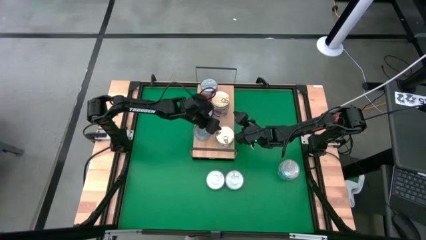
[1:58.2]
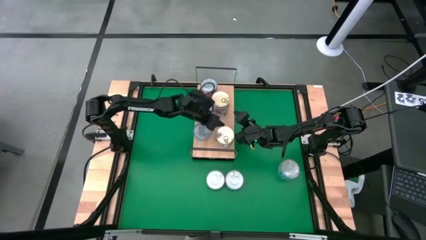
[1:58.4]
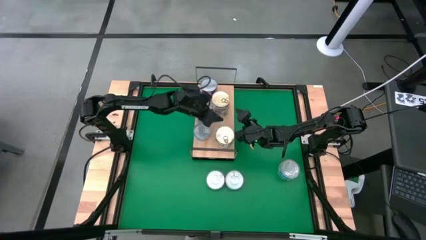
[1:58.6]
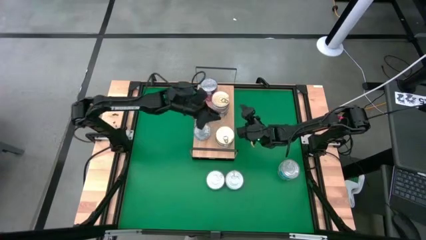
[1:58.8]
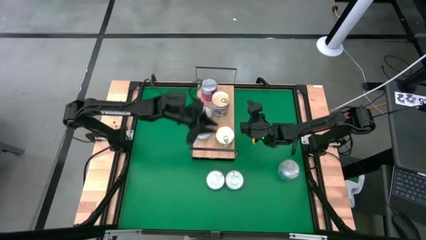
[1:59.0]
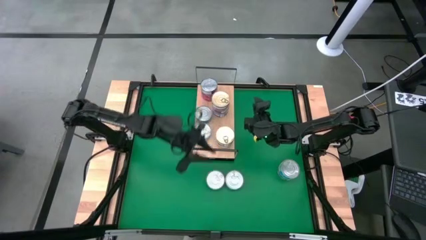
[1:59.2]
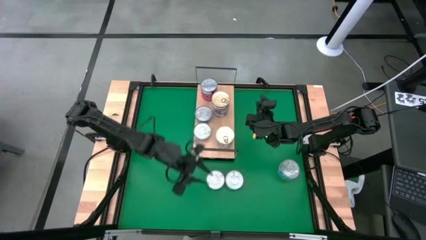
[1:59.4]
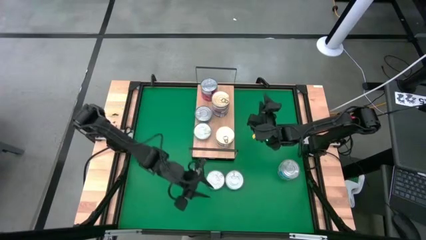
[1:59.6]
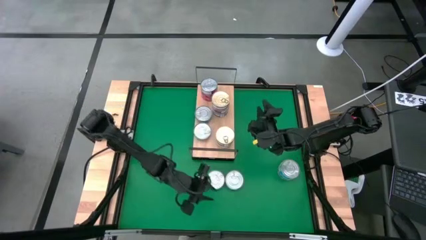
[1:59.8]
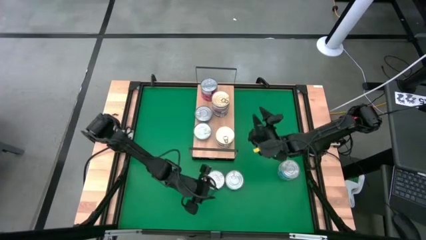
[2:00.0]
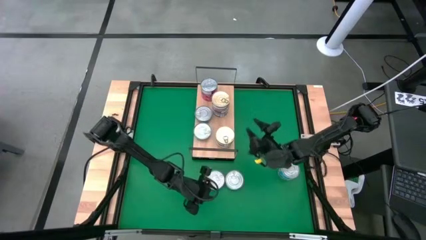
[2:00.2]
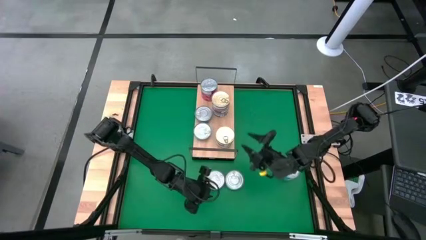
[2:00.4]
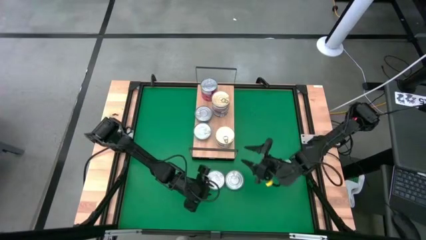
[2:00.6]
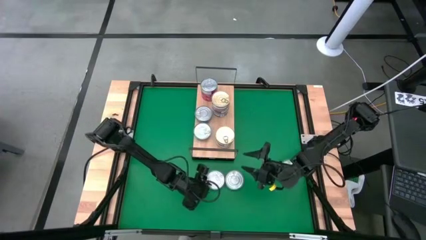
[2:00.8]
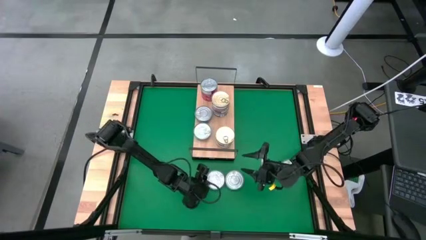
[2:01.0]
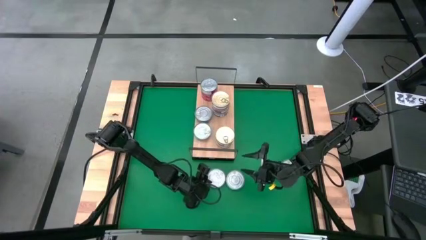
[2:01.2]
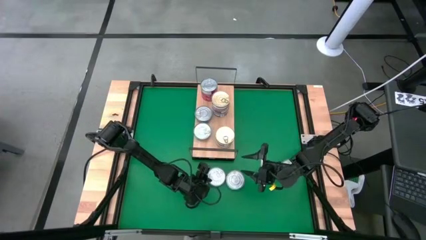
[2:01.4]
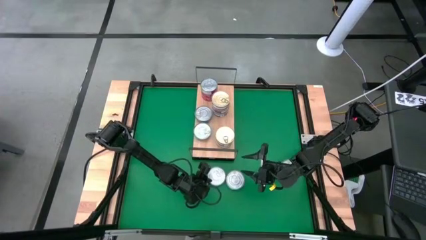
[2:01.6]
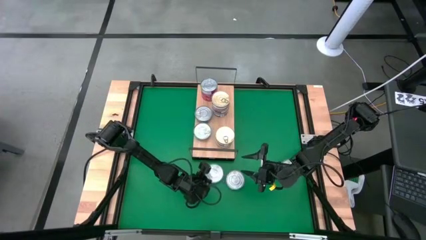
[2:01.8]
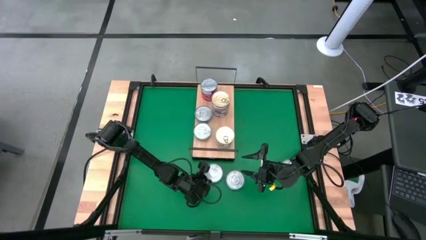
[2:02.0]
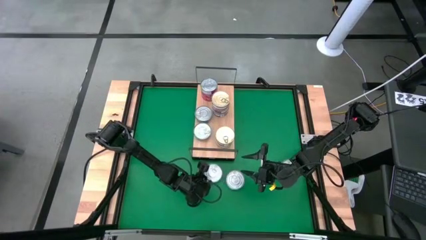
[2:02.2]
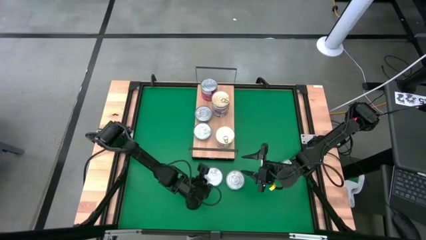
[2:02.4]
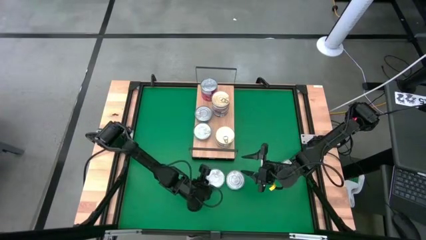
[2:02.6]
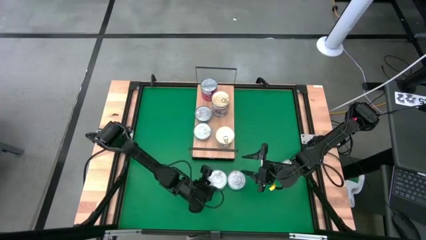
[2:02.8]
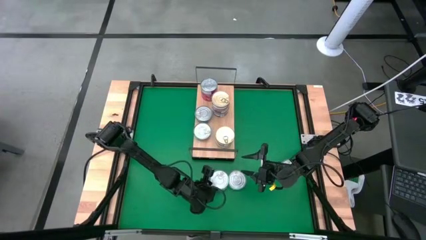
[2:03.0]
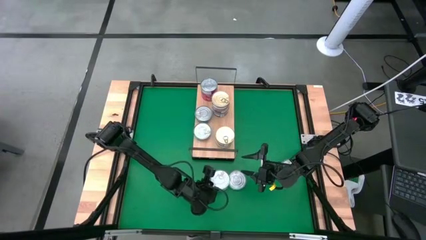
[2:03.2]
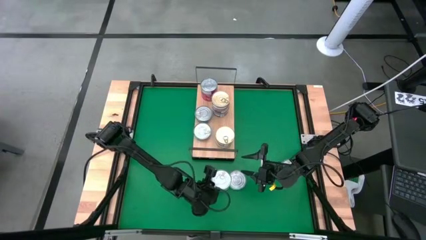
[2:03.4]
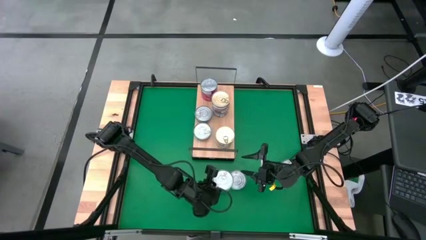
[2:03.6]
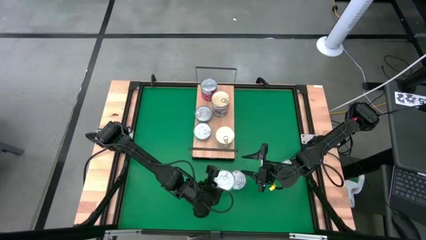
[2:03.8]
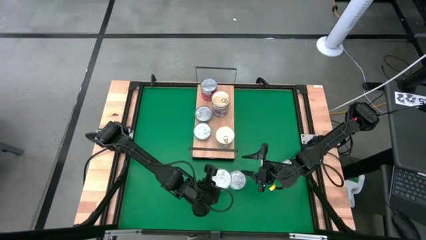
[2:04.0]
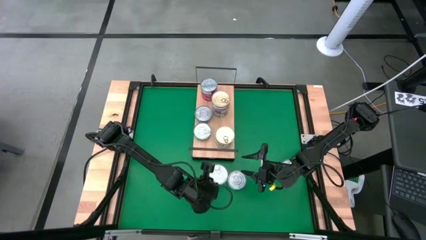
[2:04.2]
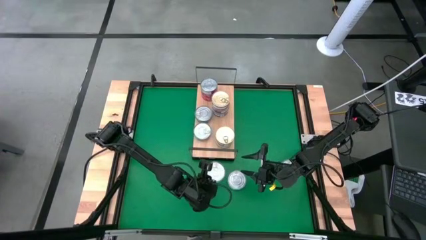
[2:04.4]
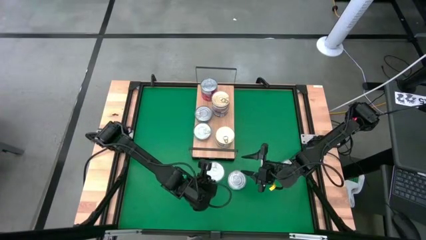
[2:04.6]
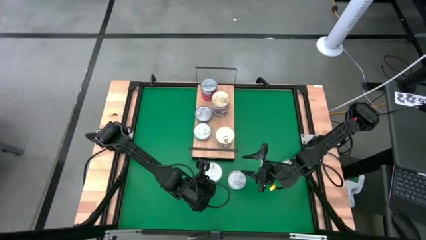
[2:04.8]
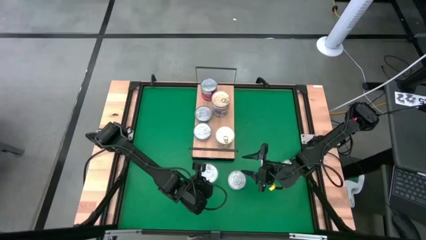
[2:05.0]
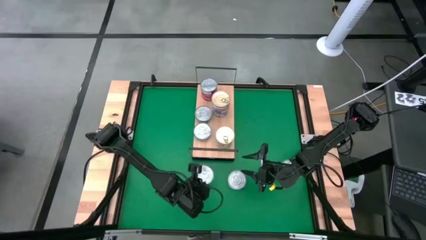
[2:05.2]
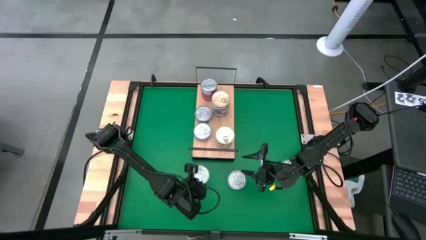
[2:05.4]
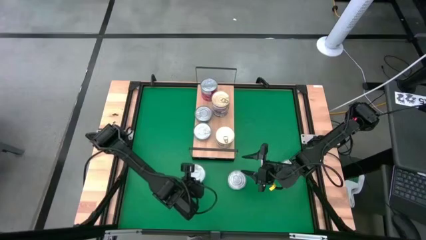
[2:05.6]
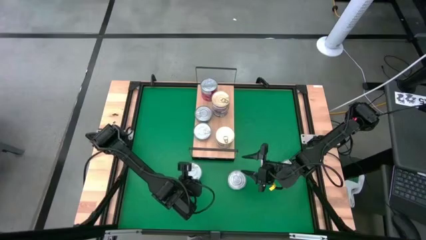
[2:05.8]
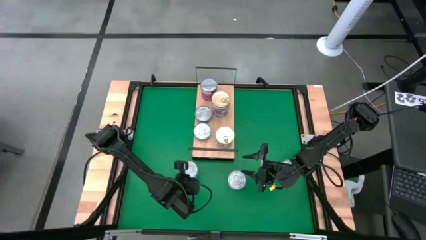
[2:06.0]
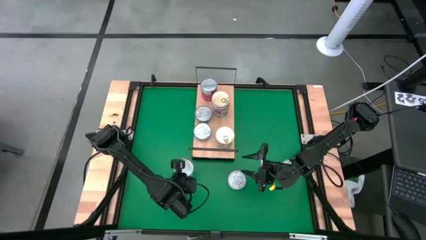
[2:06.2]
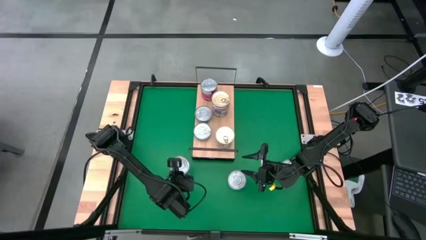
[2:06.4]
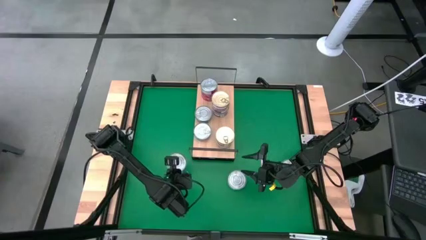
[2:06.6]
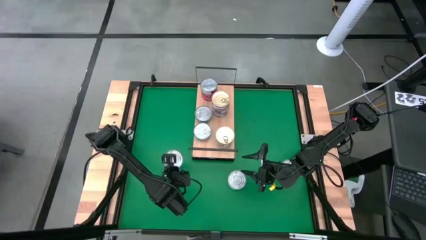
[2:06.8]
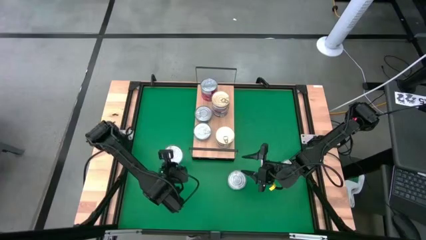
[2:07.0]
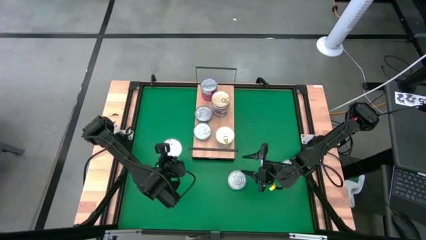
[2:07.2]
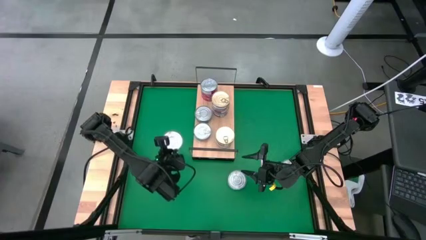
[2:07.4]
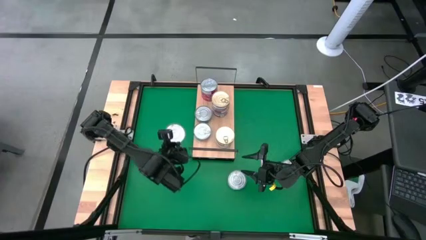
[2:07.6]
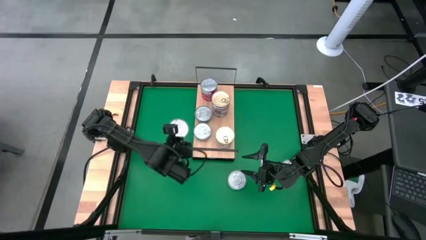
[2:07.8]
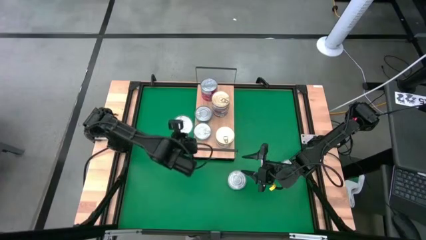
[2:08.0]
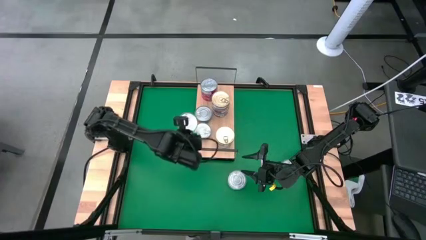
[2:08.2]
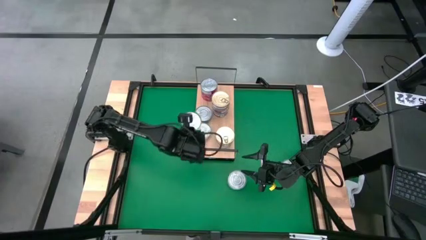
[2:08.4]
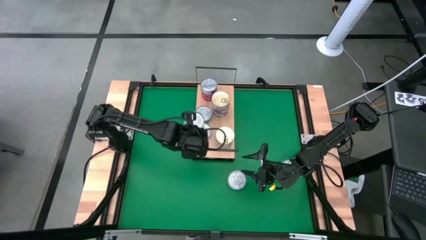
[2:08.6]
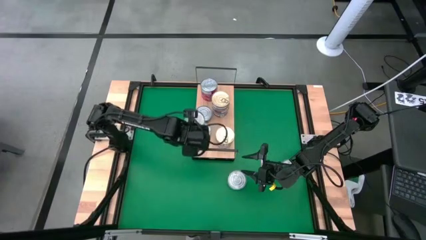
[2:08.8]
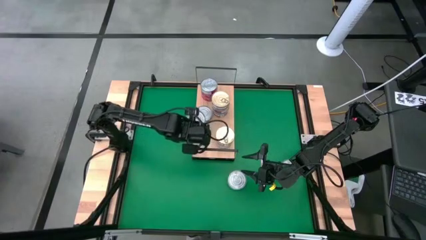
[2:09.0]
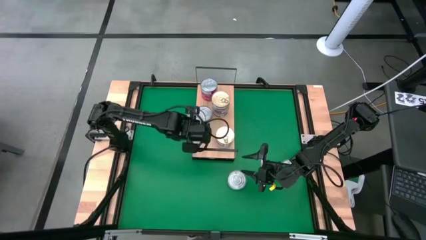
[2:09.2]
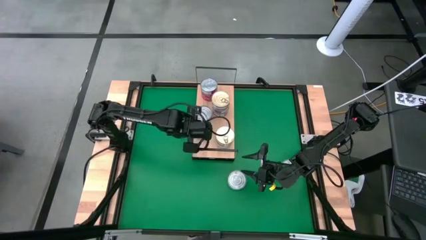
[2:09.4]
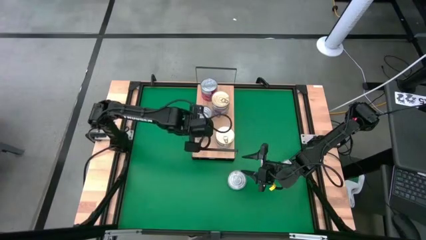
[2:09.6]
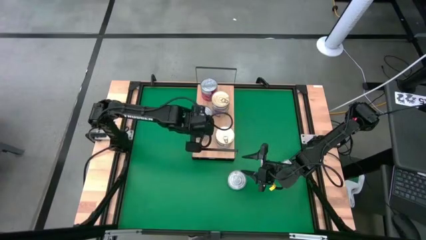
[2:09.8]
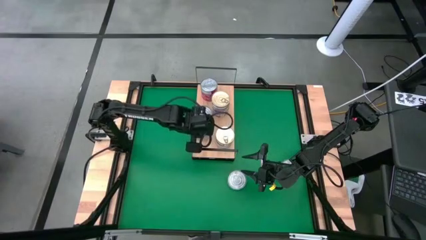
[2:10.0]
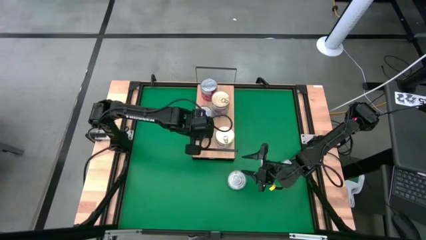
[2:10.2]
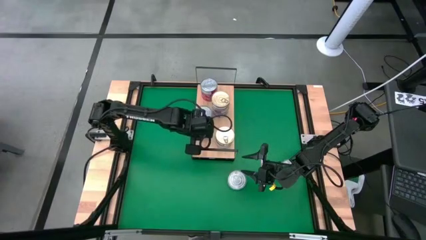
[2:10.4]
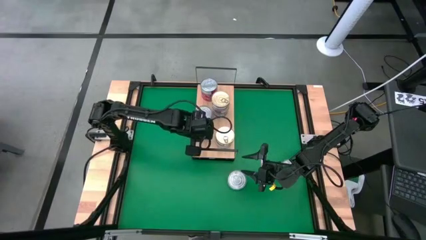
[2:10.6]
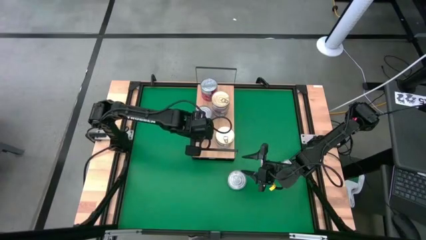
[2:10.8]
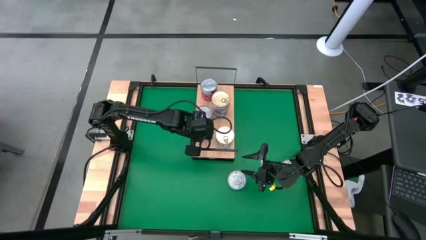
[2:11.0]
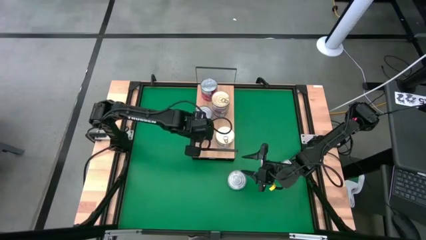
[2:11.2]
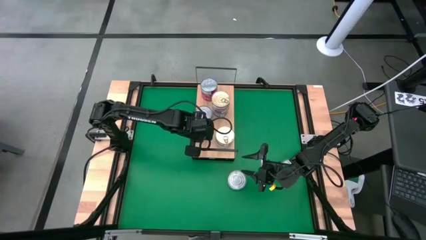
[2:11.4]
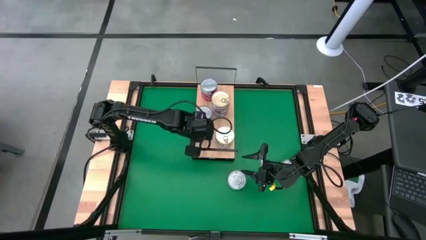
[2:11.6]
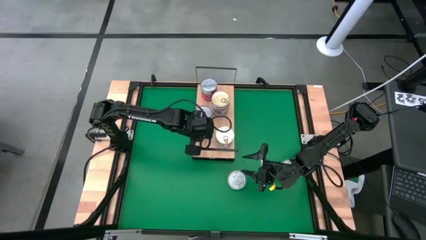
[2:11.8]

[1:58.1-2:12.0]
Task: Stack canned seafood by type on shelf
Stack the light blue tuna can on top of the light blue tuna can on the shelf
